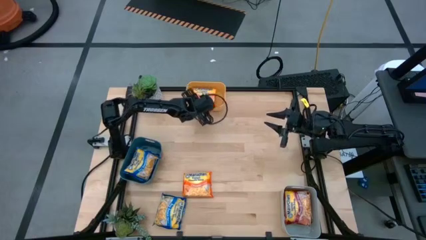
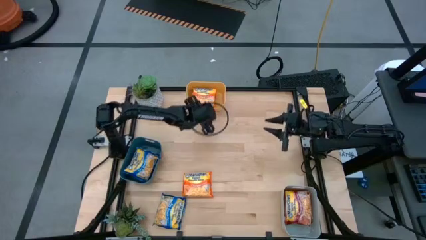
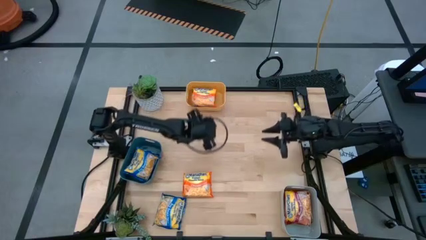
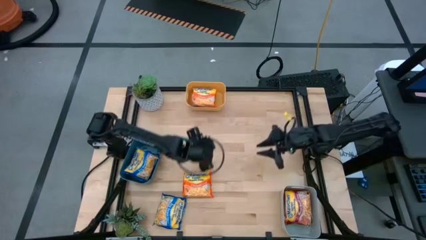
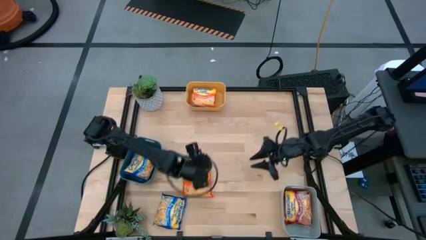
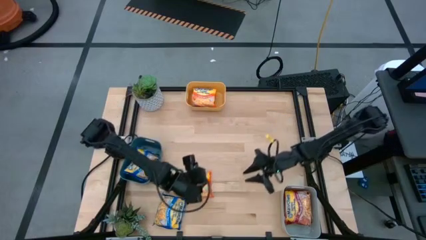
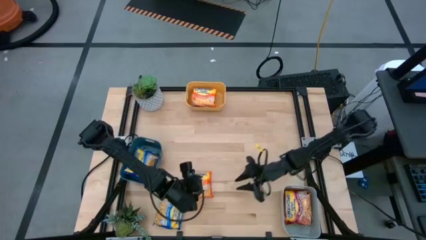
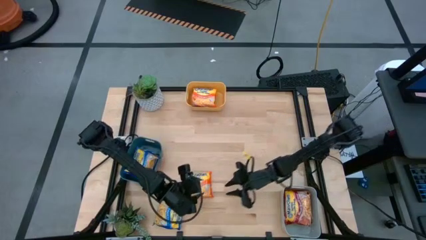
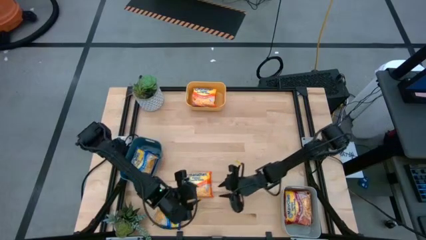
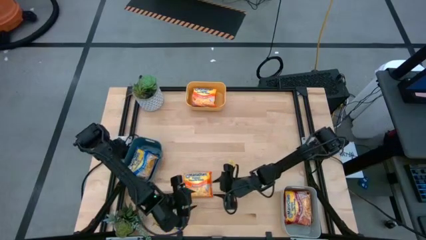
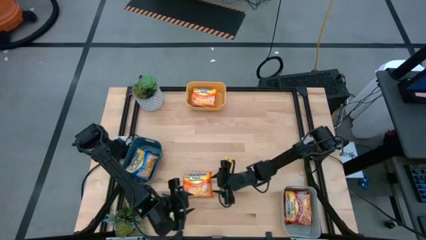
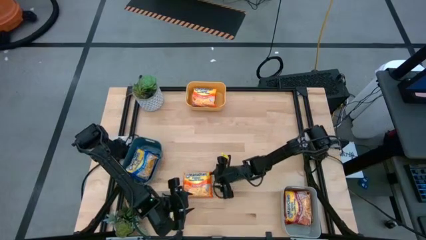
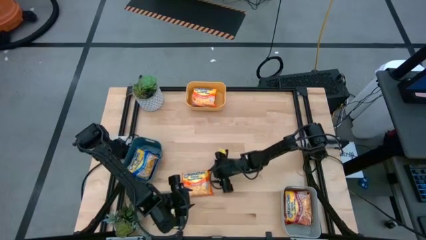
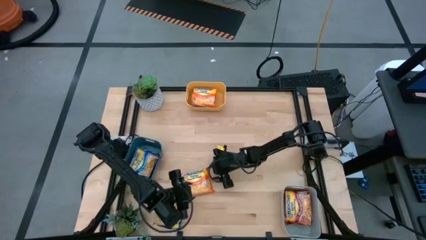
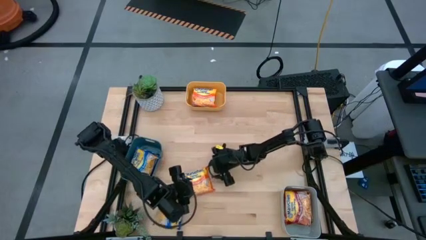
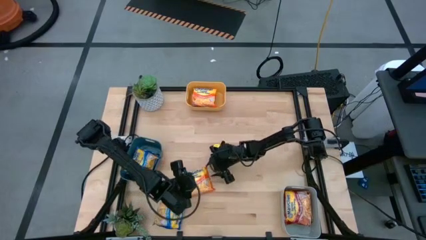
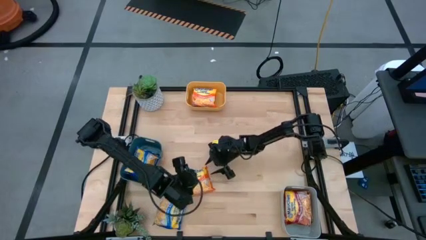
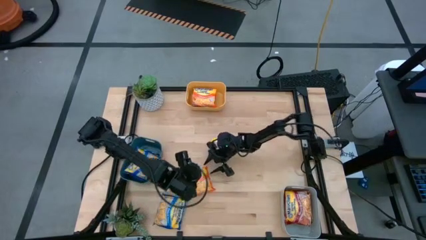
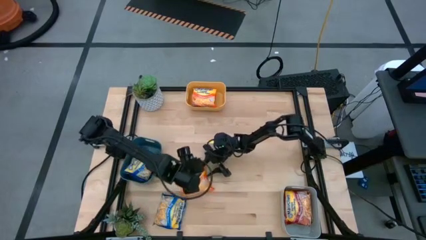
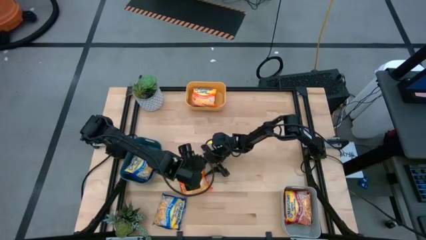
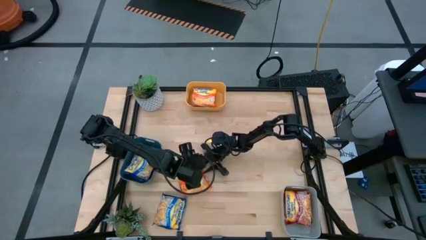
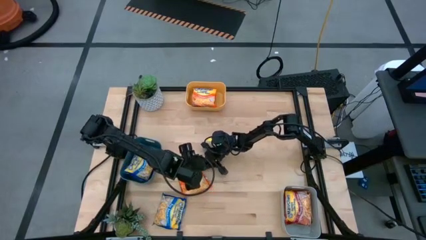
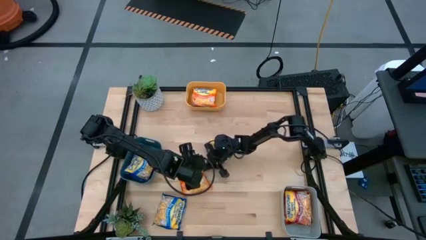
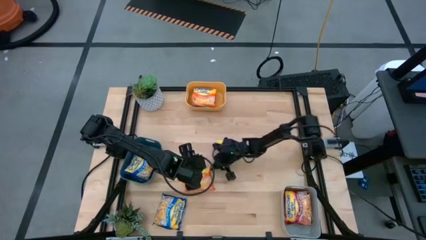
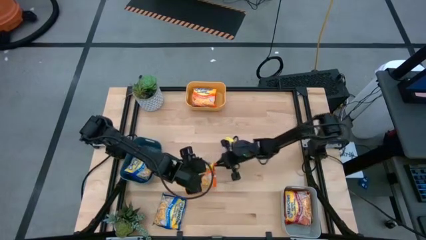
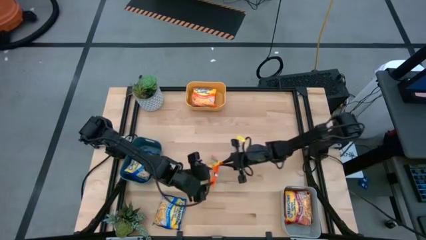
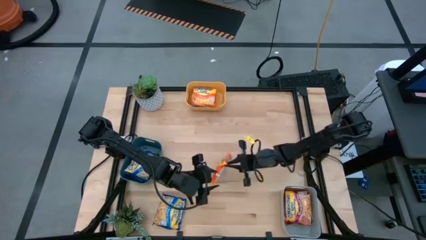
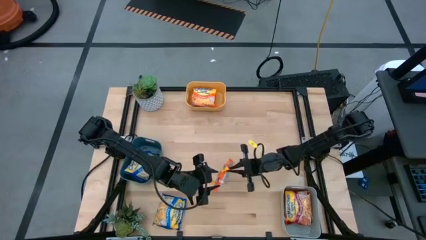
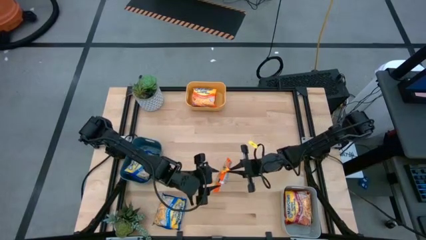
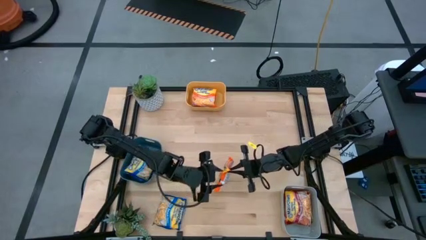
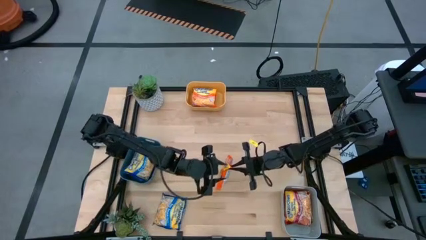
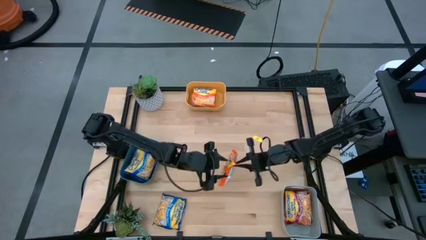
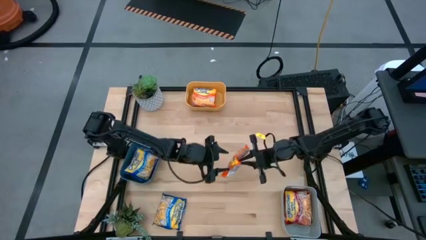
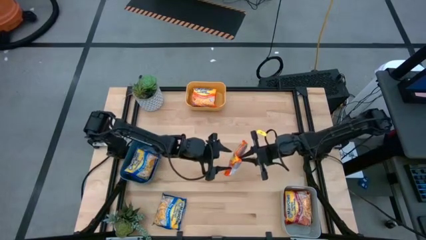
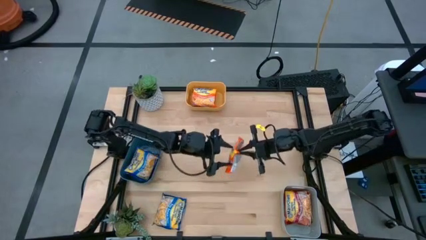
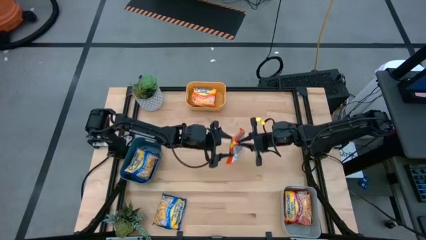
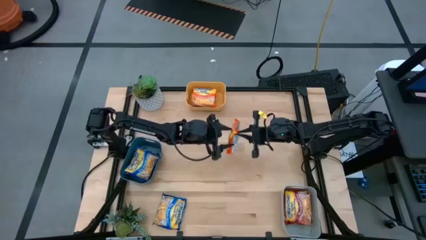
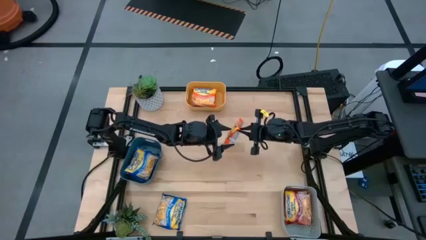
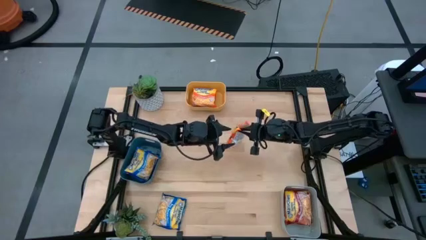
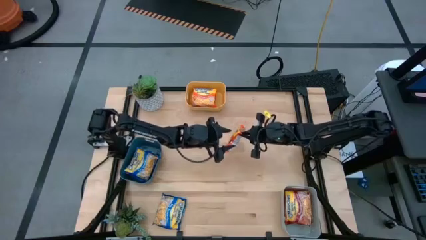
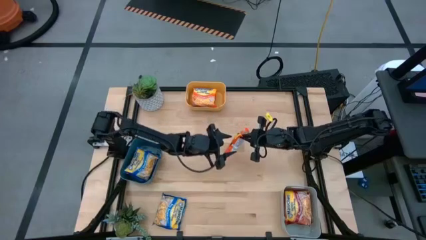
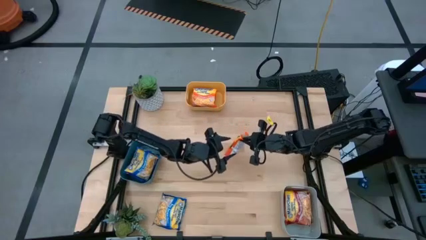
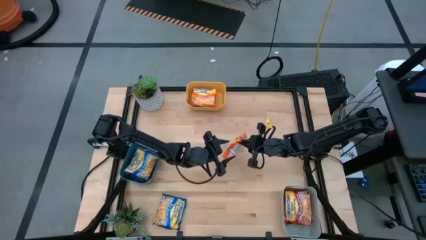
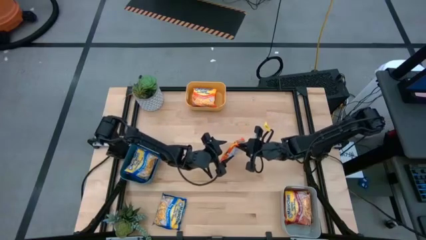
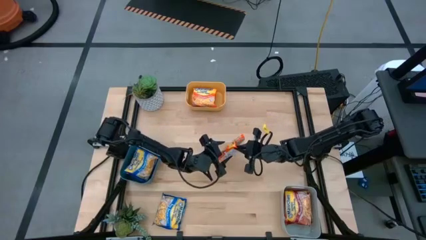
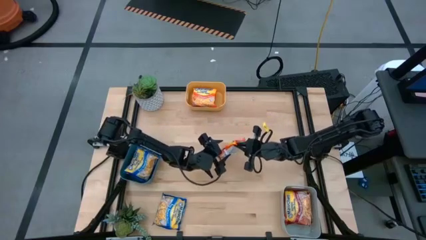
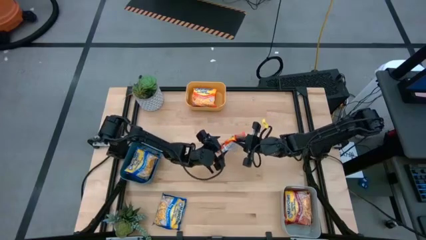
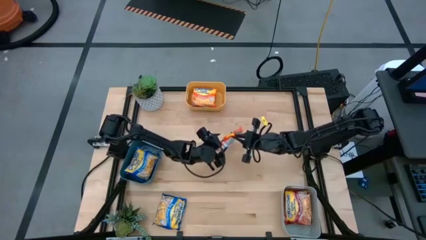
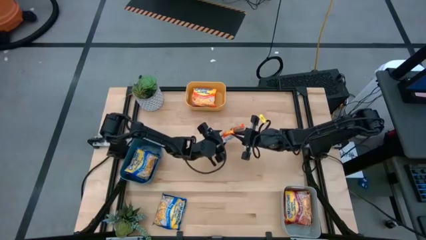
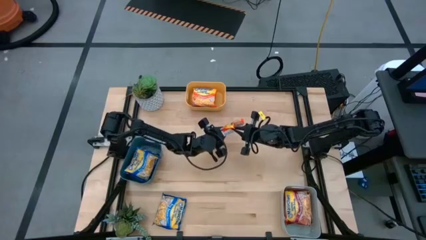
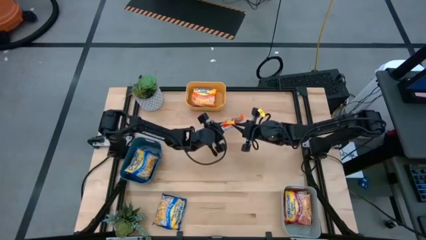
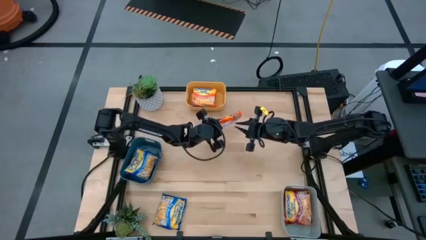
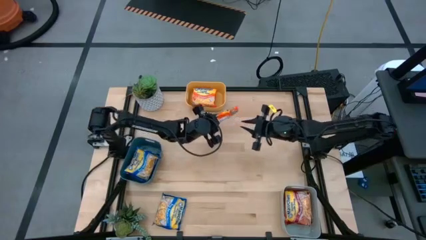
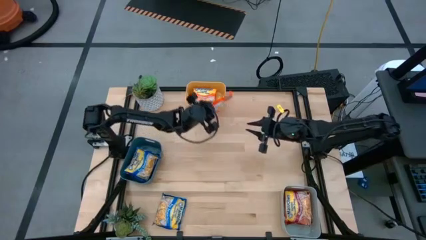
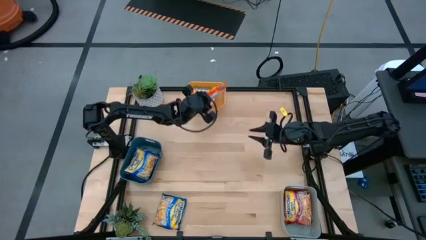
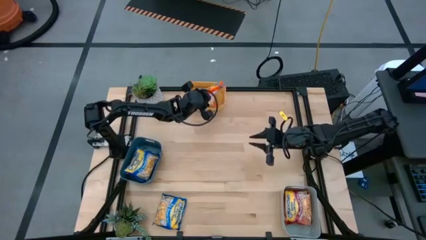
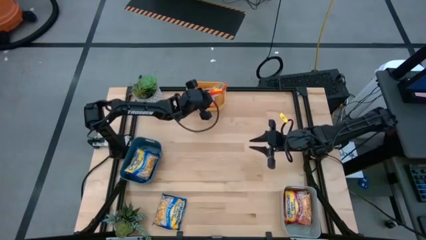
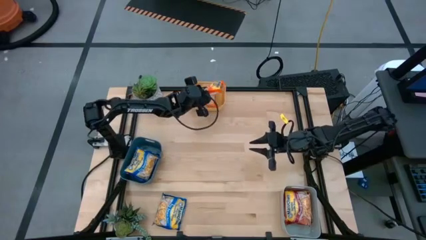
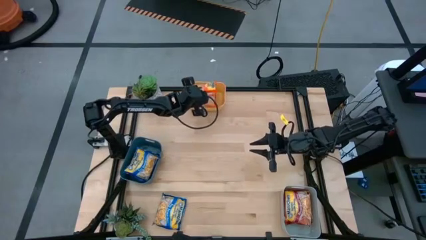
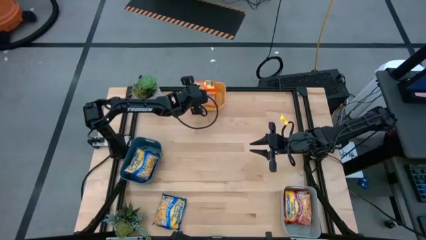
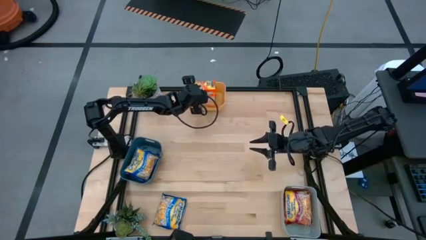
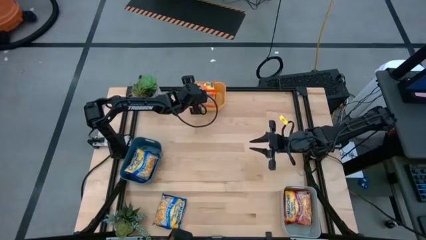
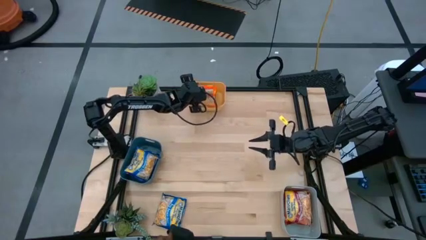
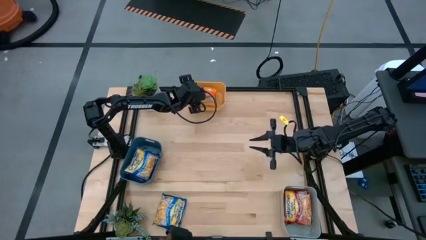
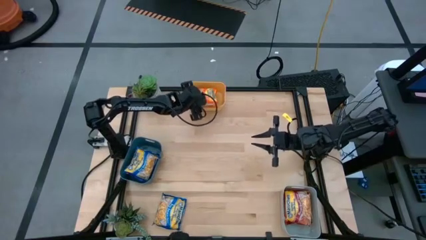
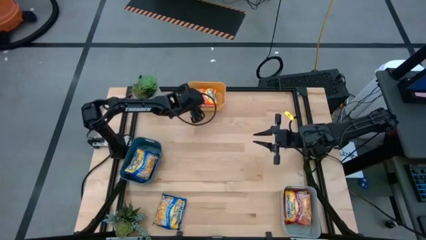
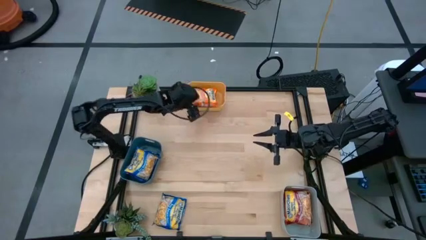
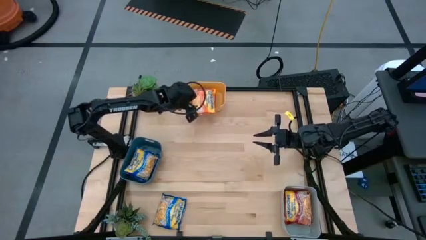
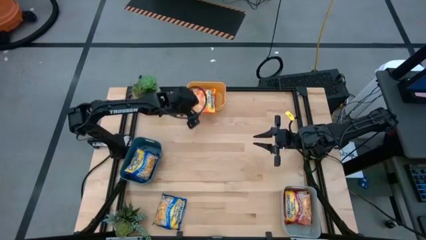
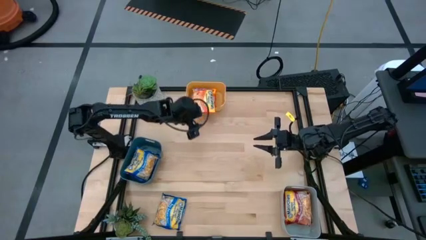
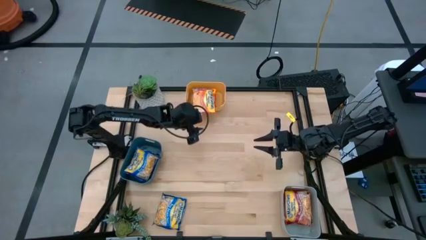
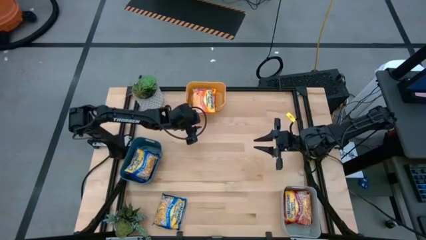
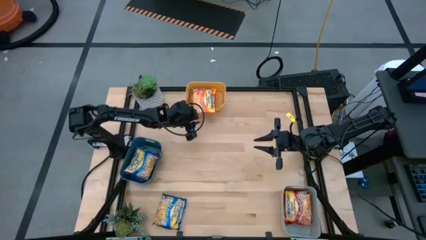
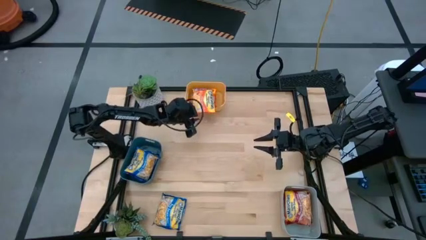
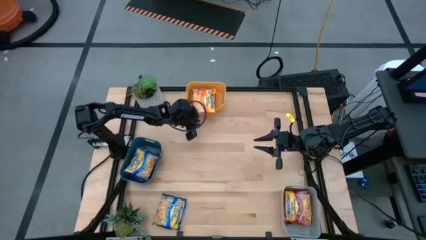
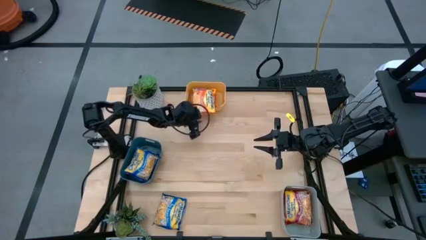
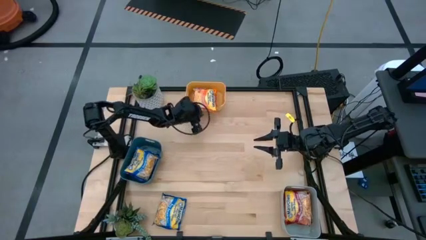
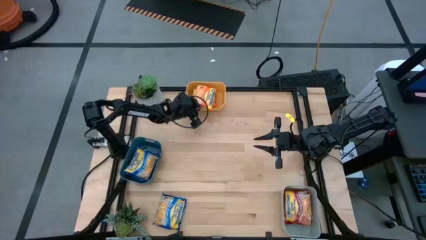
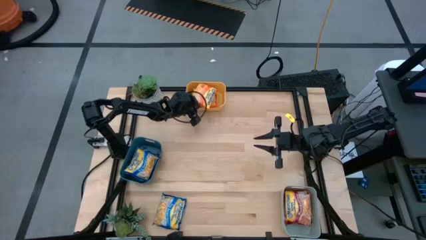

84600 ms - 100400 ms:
Task: Sort Maruchan noodles
Put the orange noodle pack into the yellow bin
